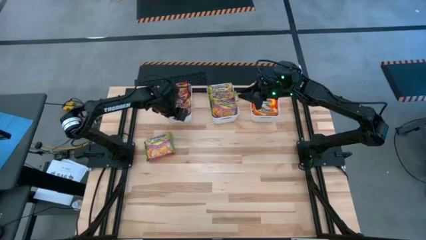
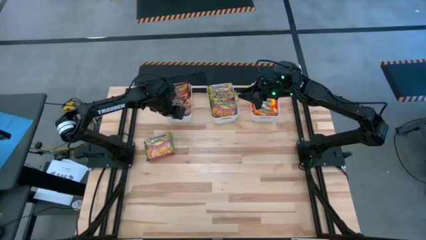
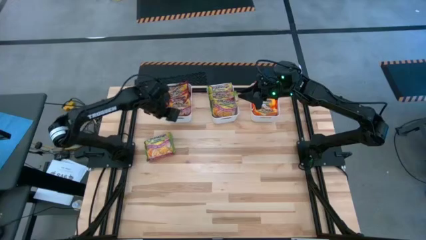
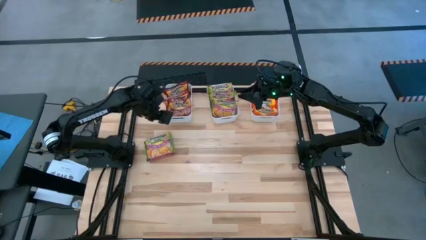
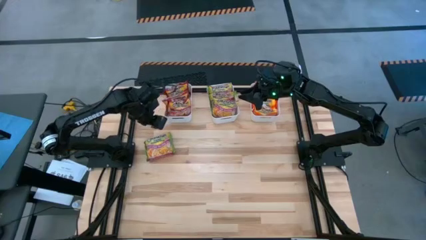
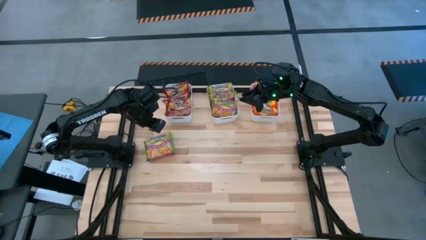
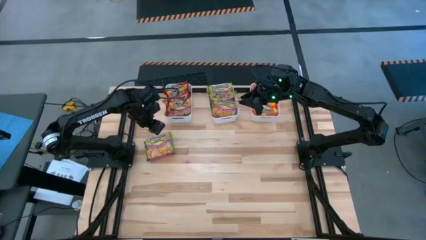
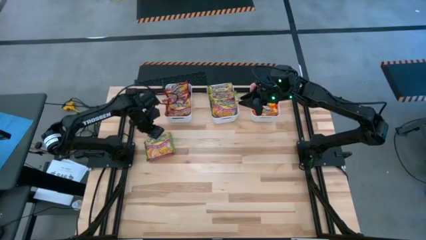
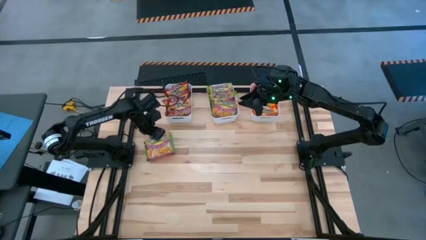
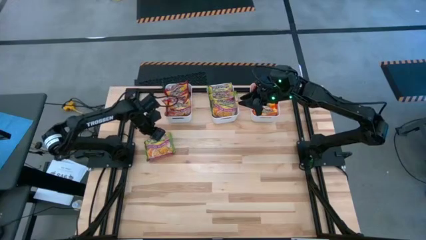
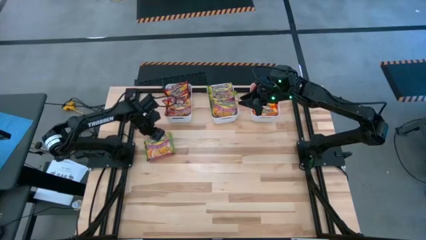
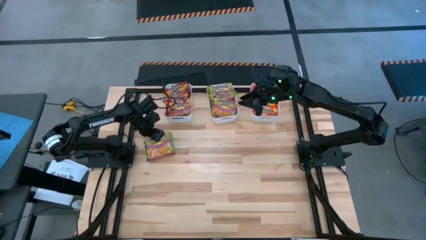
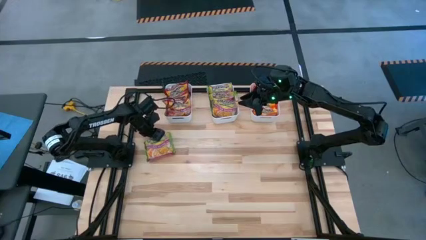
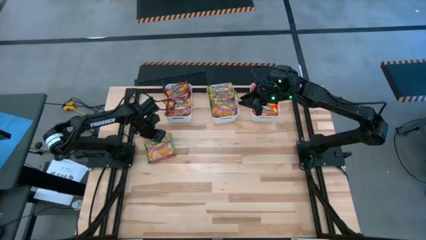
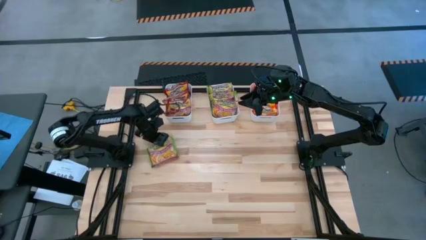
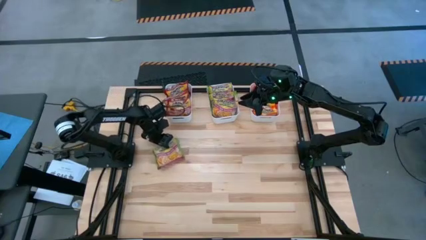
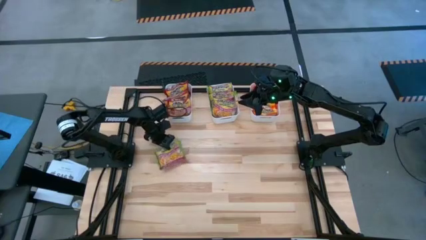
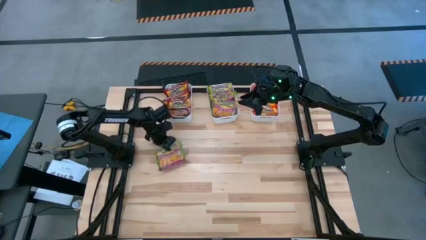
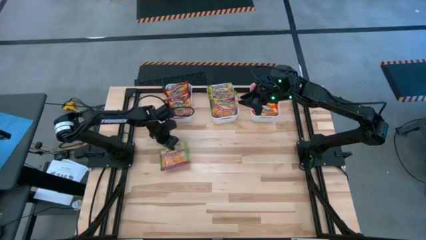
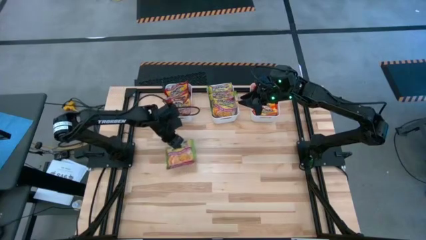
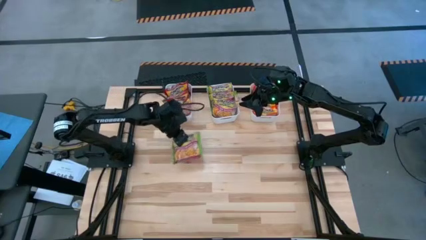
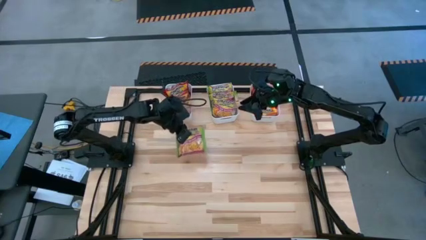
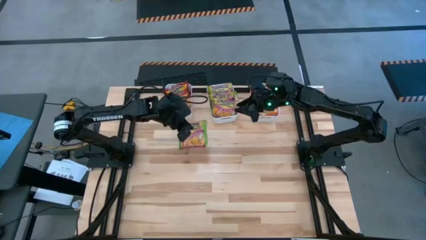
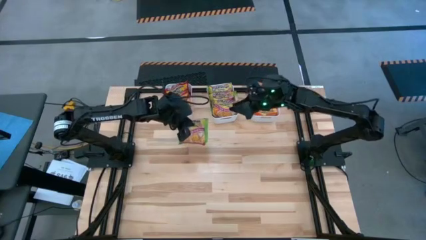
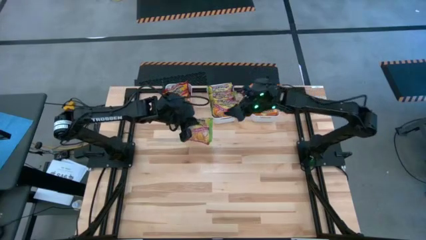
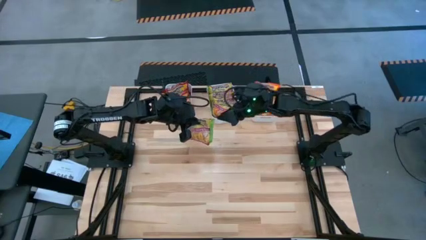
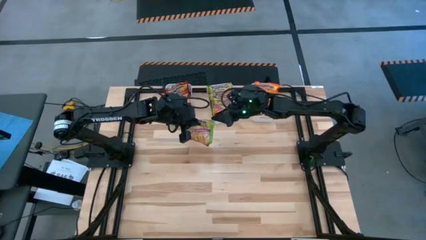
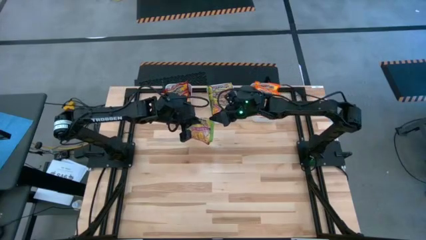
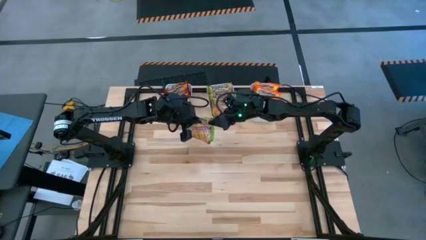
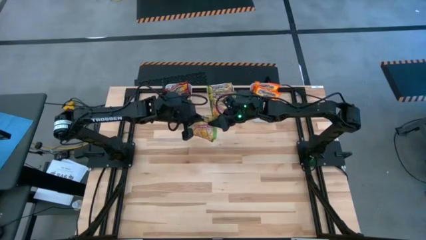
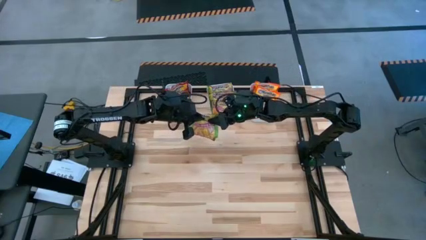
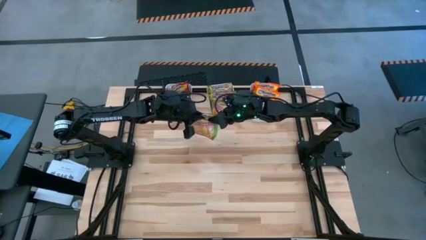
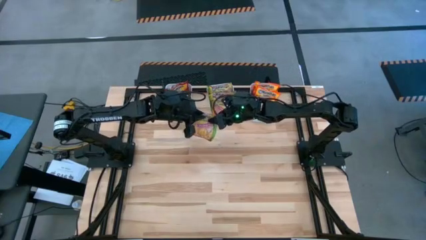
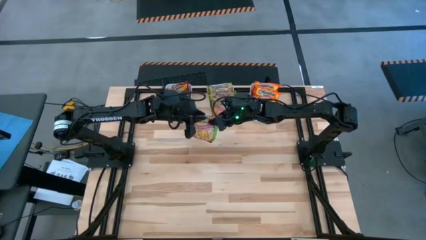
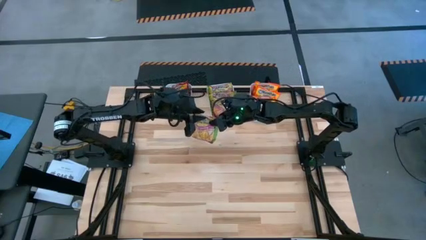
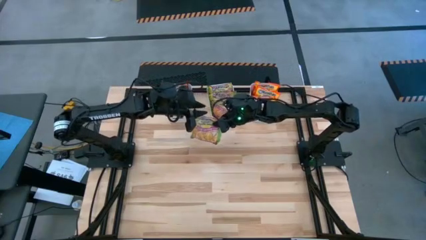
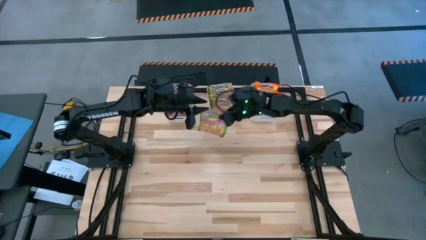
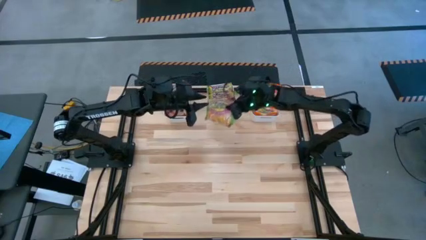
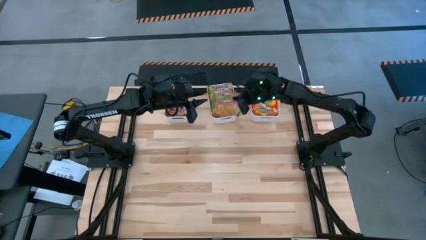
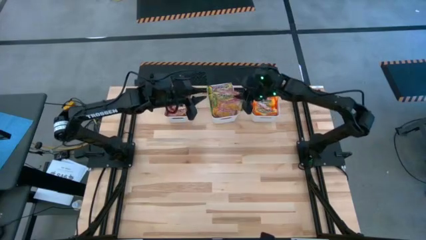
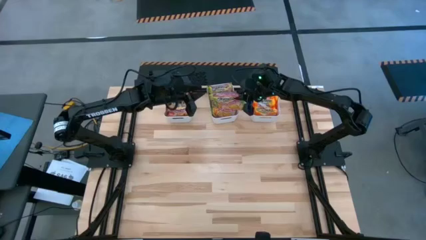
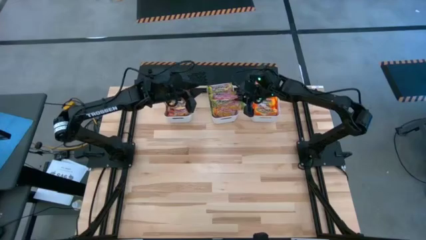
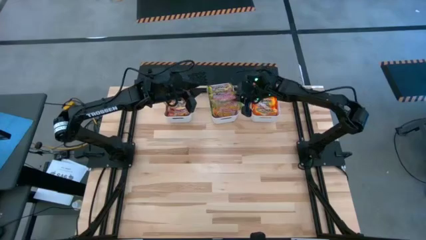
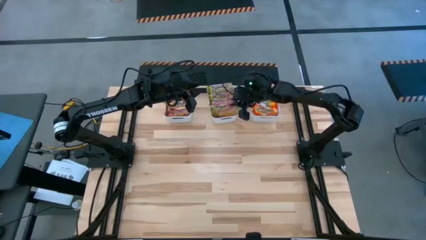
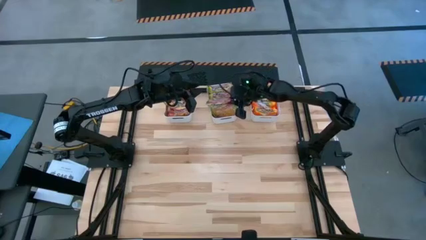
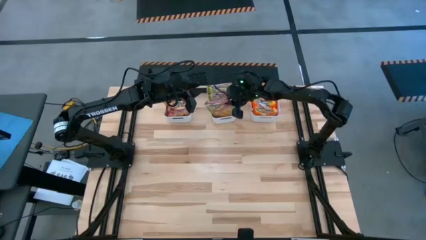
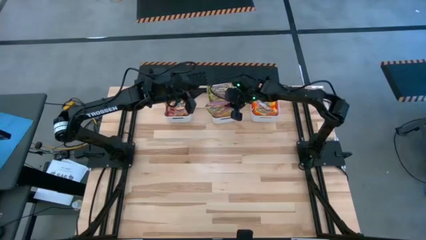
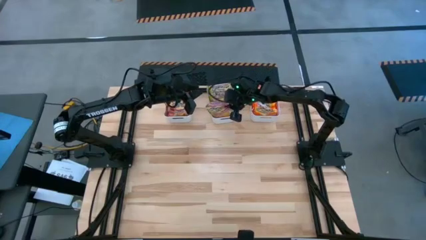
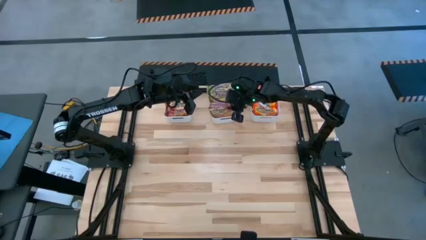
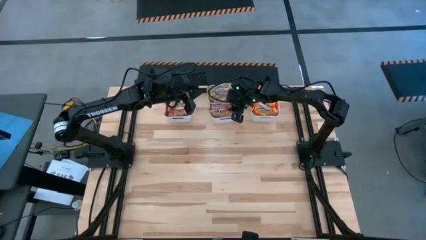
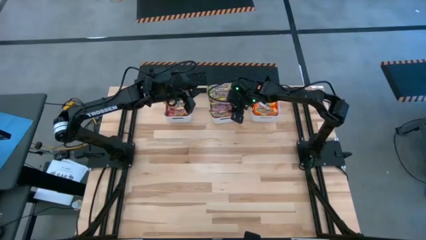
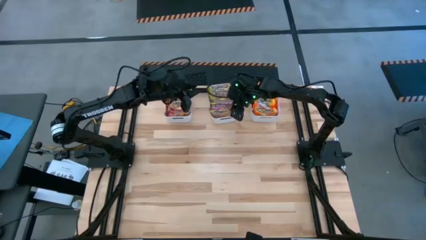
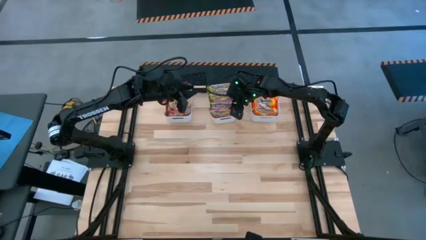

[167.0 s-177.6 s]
Task: Sort Maruchan noodles
Put the green noodle pack into the middle white bin

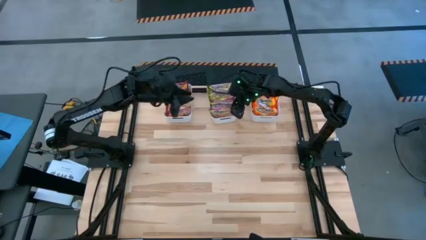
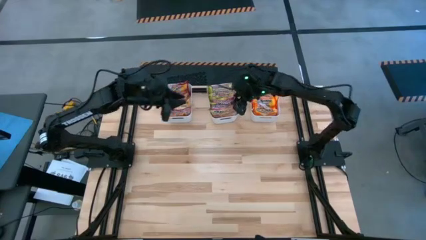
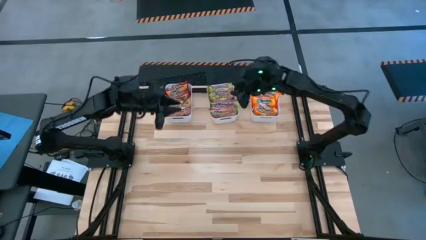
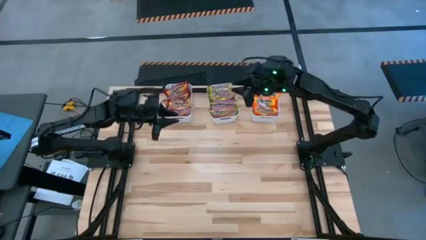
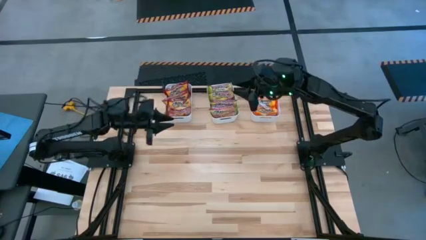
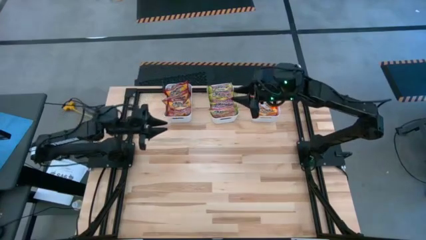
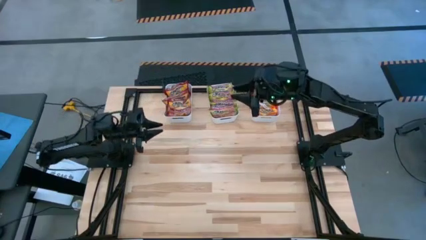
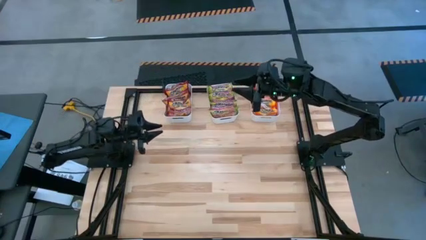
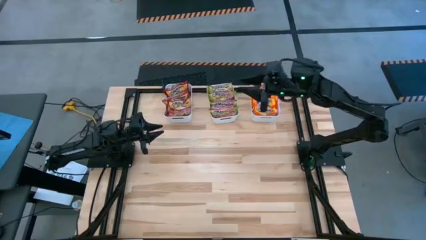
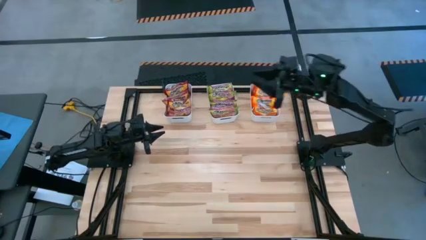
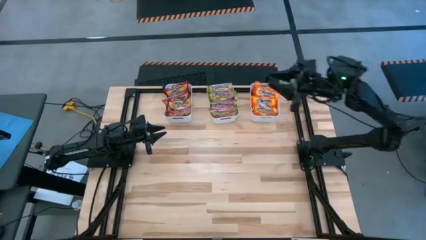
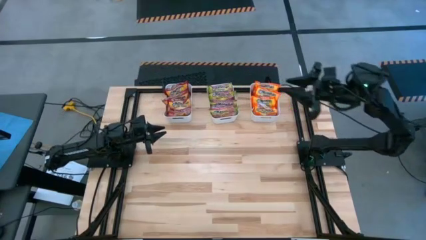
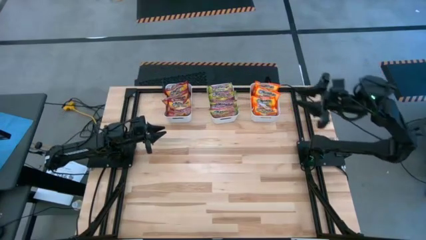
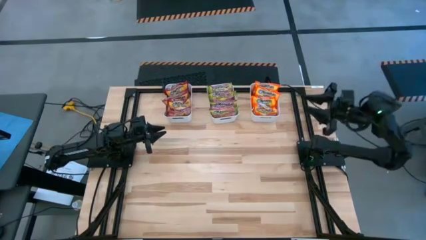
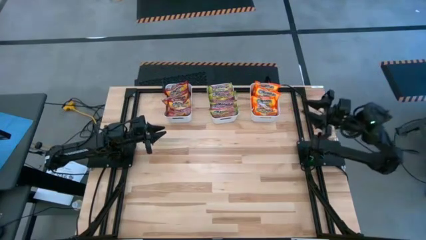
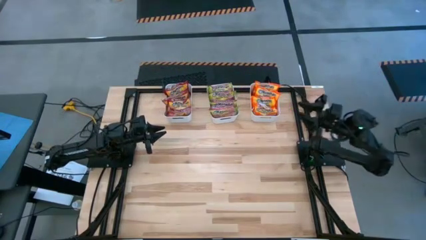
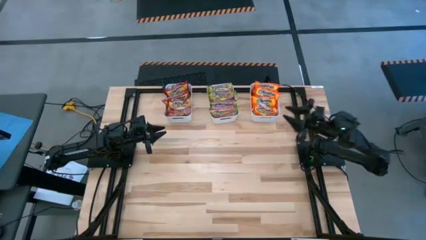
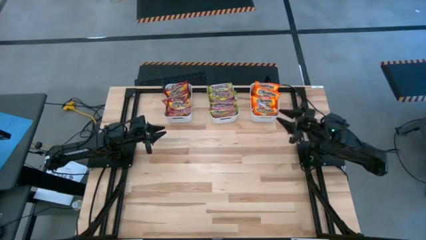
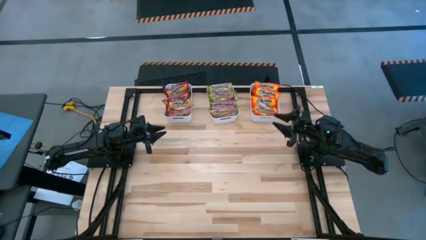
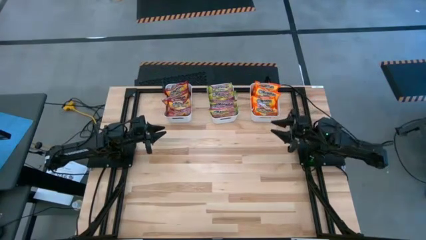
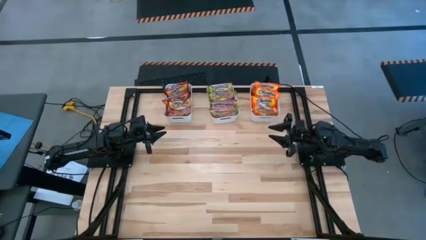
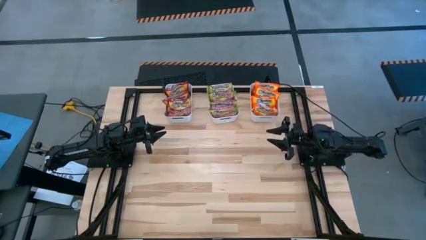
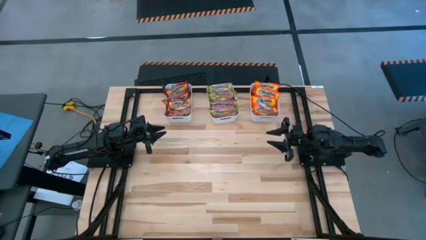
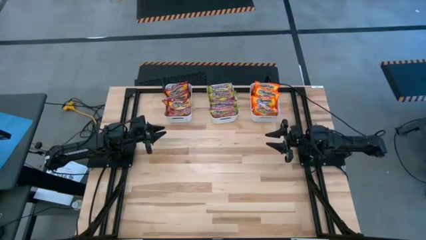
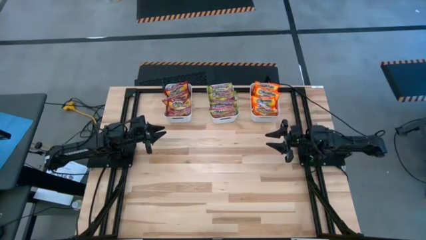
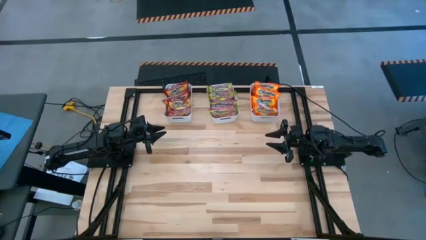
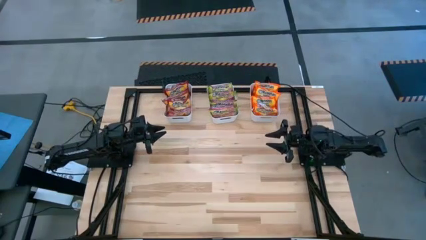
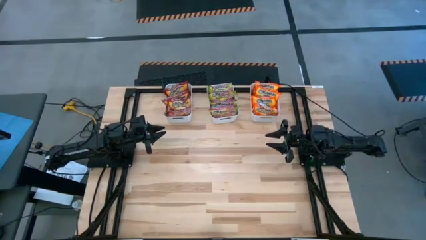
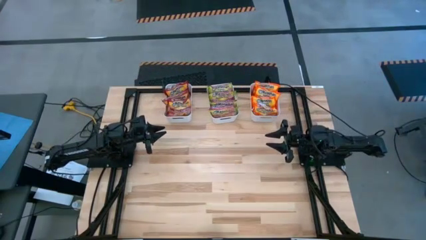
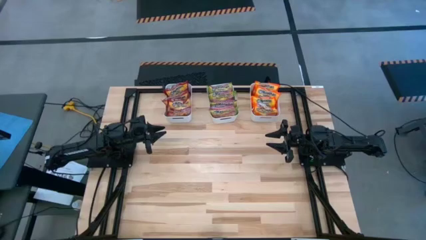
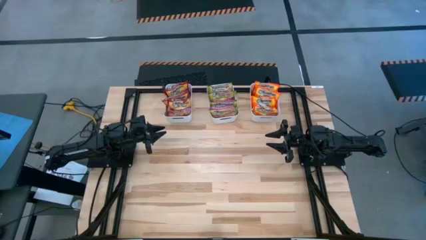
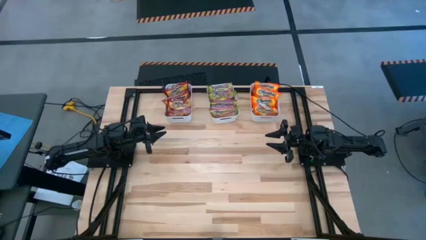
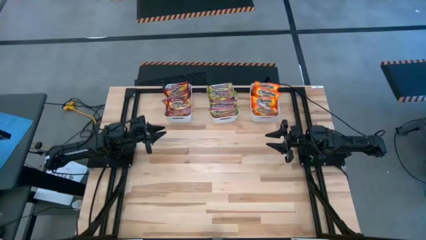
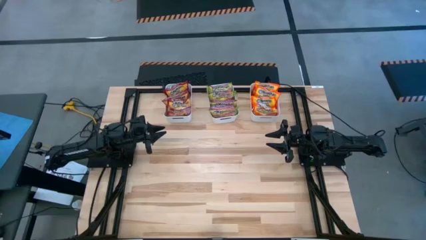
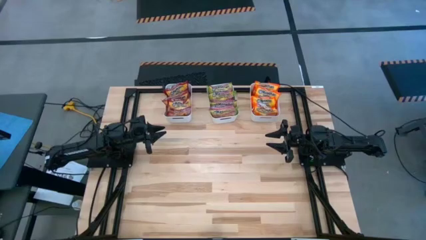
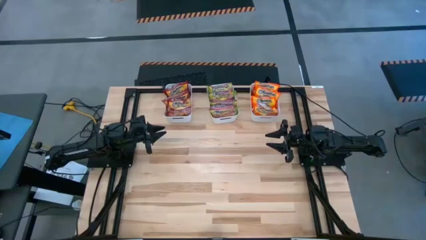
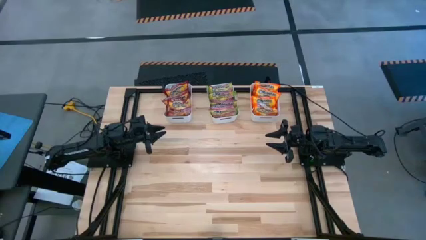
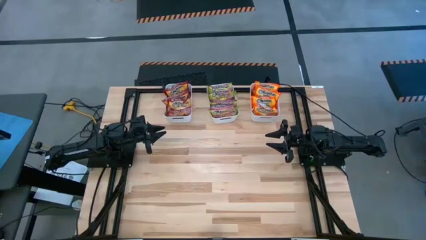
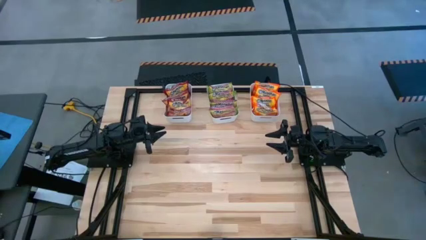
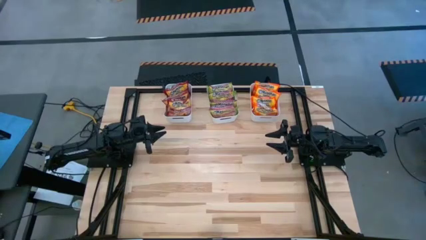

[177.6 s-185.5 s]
Return to Home Position
